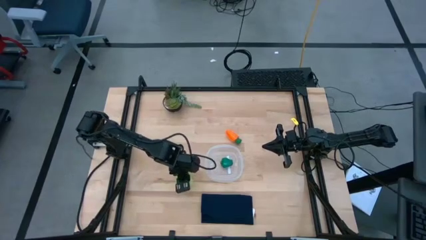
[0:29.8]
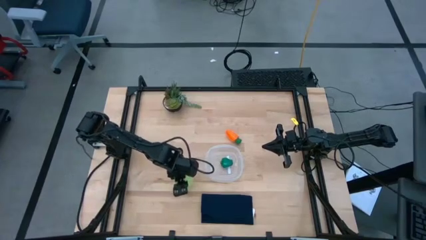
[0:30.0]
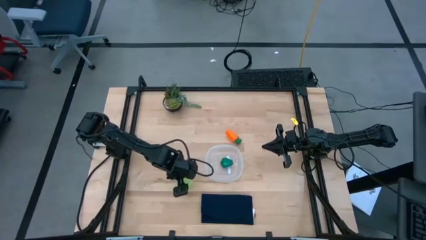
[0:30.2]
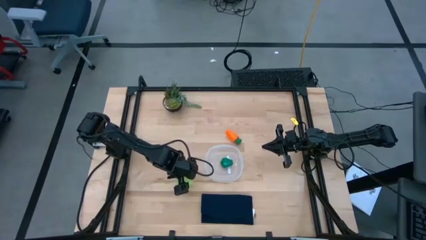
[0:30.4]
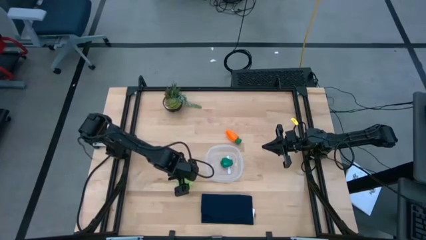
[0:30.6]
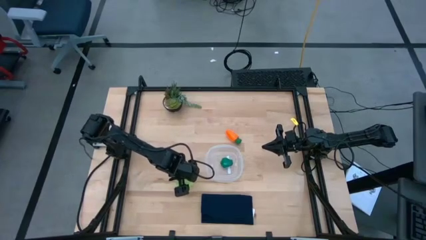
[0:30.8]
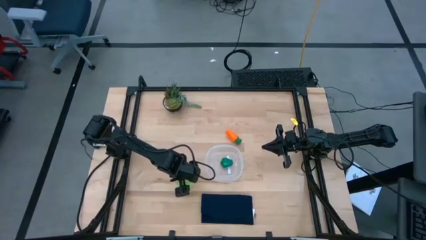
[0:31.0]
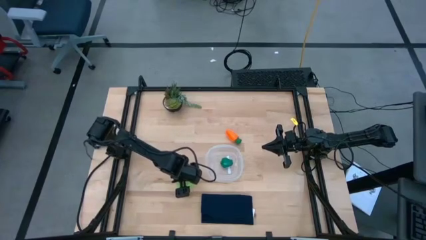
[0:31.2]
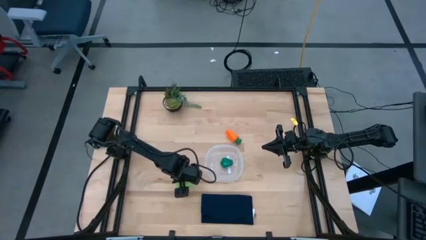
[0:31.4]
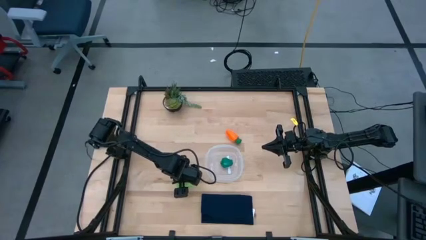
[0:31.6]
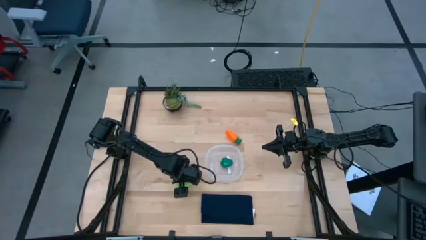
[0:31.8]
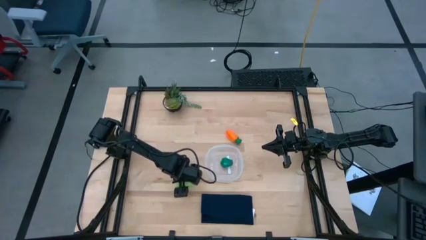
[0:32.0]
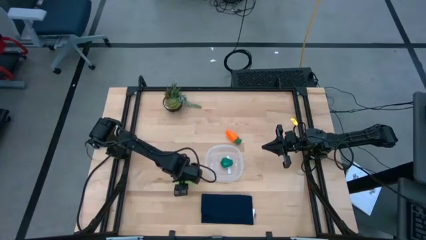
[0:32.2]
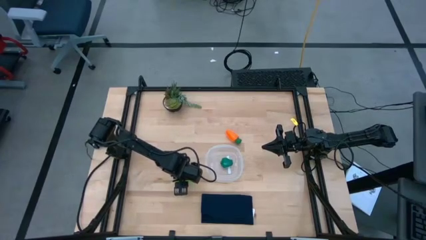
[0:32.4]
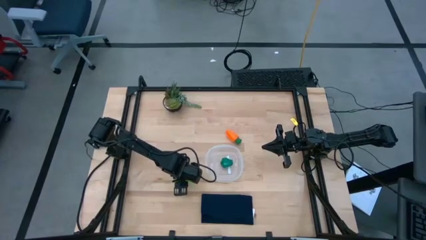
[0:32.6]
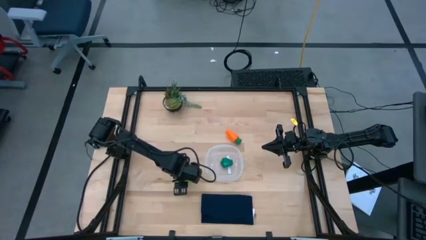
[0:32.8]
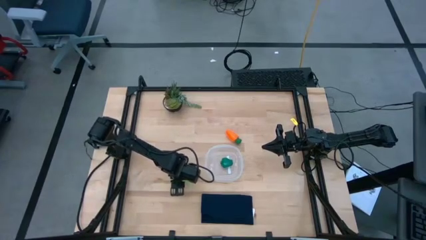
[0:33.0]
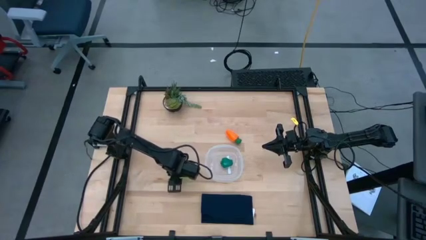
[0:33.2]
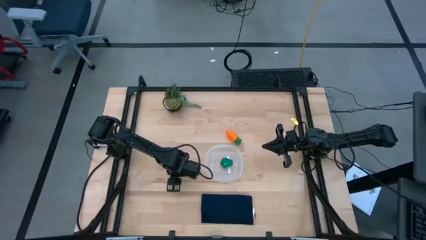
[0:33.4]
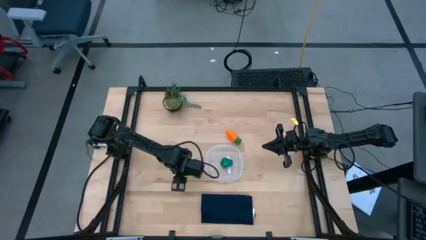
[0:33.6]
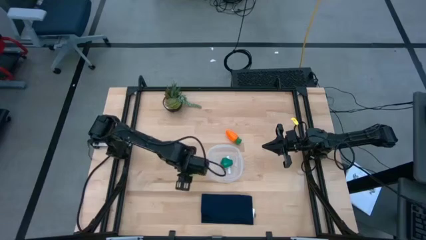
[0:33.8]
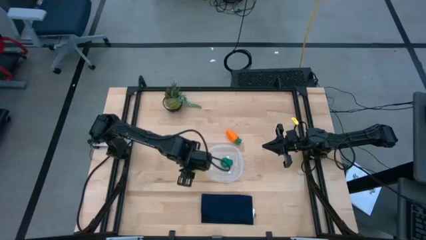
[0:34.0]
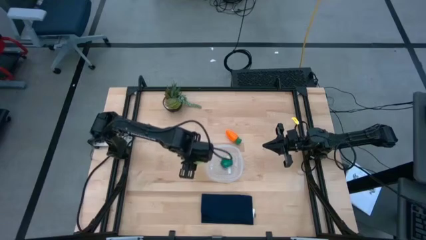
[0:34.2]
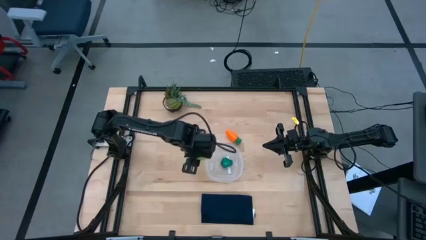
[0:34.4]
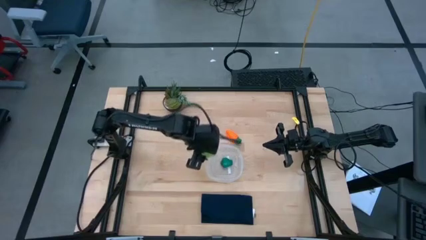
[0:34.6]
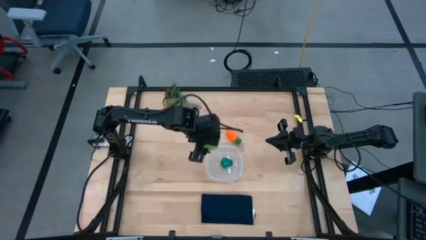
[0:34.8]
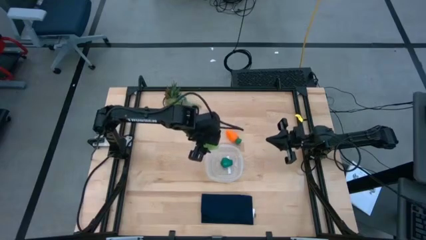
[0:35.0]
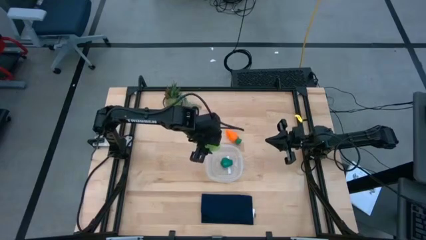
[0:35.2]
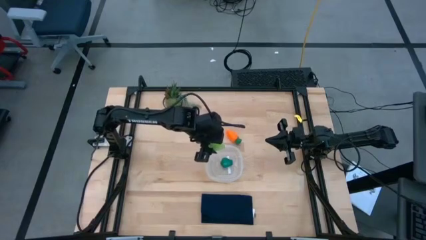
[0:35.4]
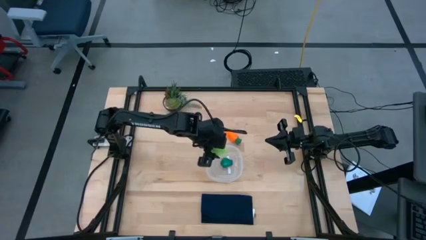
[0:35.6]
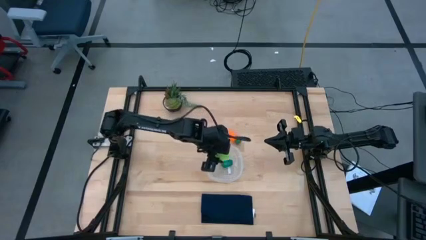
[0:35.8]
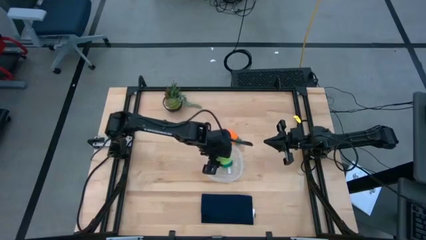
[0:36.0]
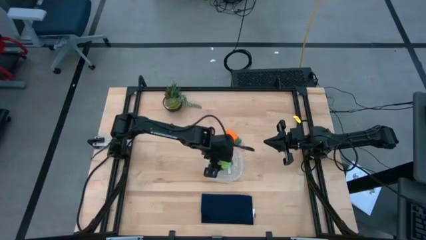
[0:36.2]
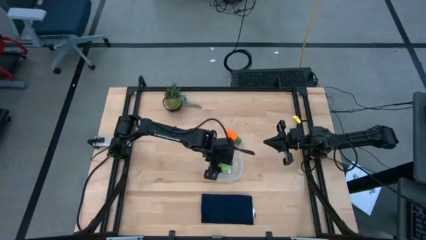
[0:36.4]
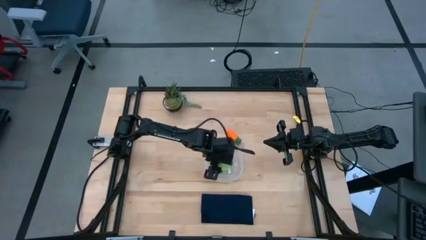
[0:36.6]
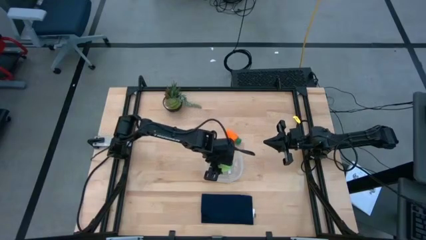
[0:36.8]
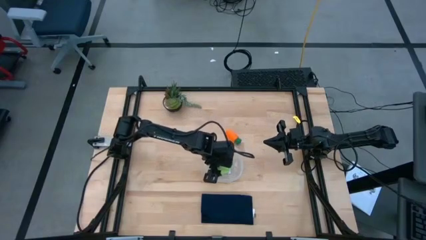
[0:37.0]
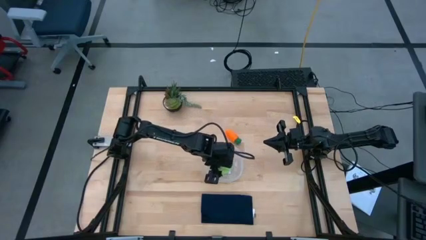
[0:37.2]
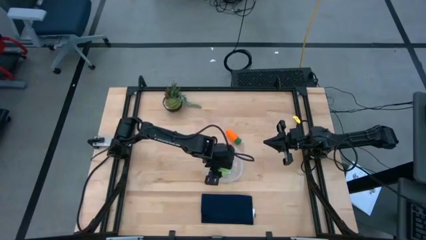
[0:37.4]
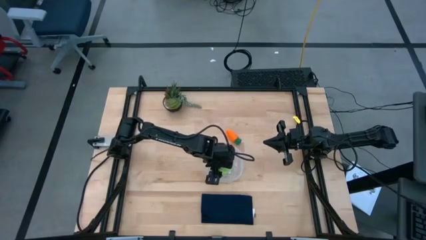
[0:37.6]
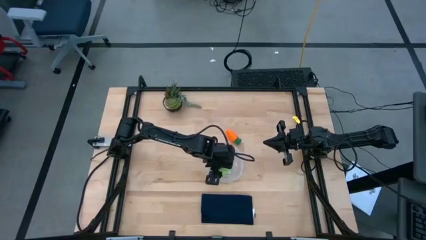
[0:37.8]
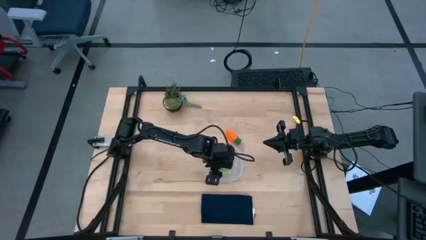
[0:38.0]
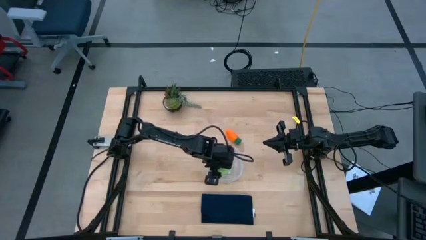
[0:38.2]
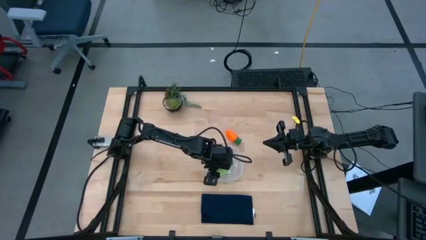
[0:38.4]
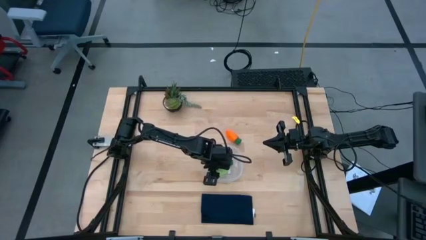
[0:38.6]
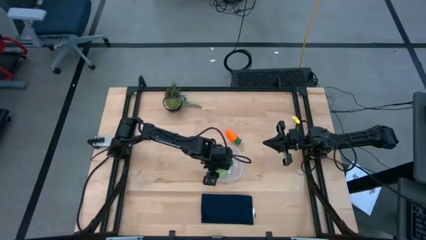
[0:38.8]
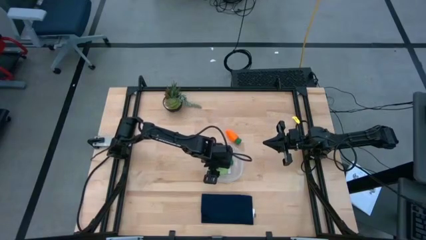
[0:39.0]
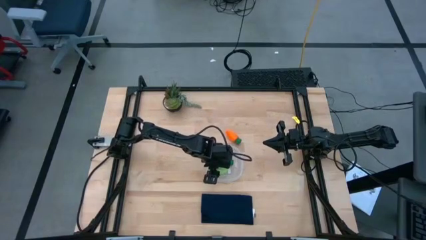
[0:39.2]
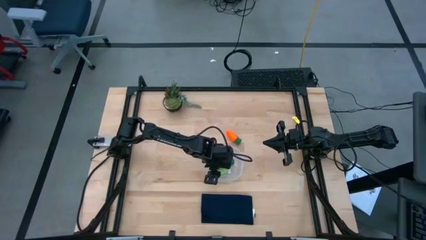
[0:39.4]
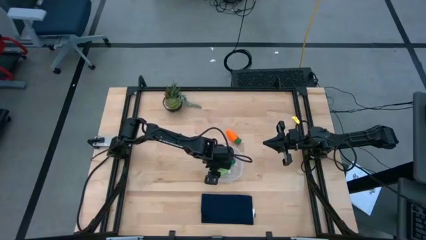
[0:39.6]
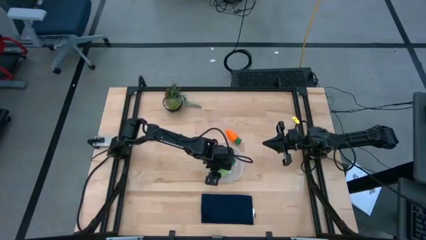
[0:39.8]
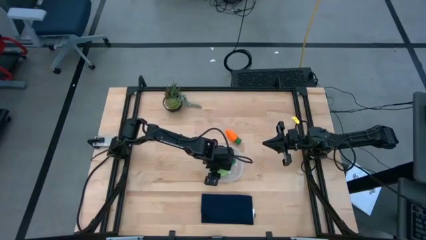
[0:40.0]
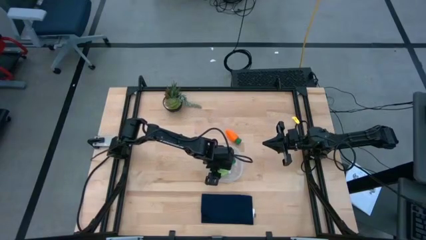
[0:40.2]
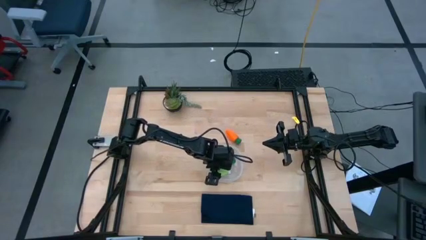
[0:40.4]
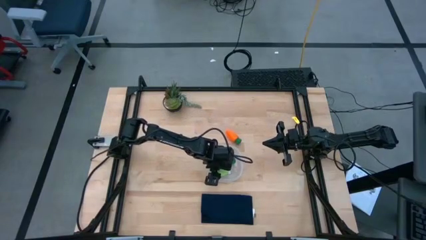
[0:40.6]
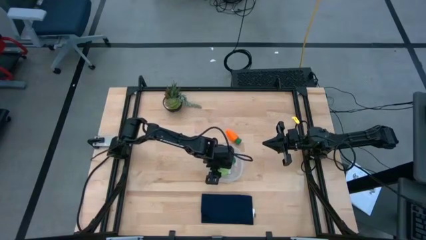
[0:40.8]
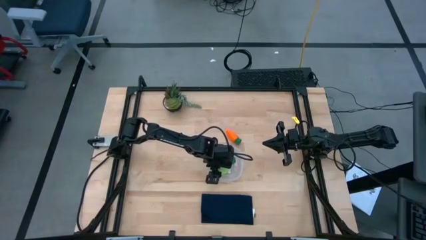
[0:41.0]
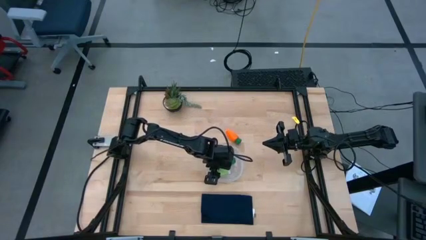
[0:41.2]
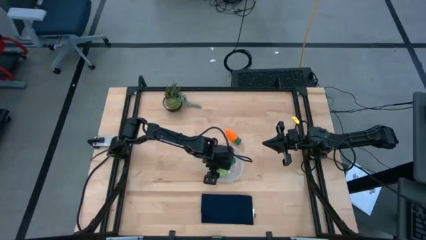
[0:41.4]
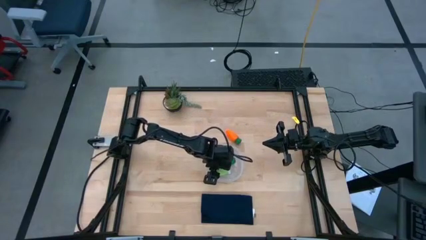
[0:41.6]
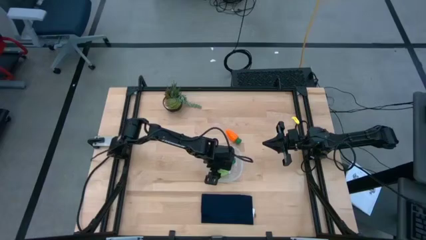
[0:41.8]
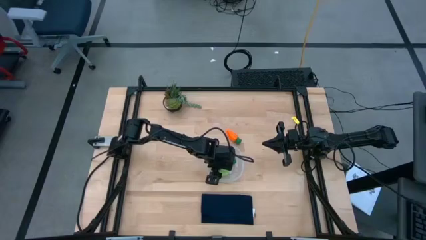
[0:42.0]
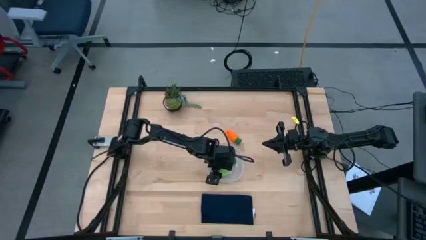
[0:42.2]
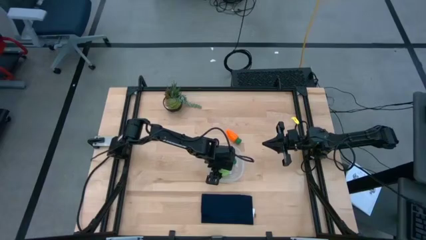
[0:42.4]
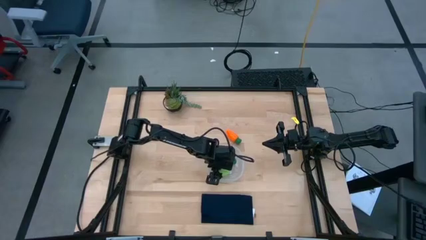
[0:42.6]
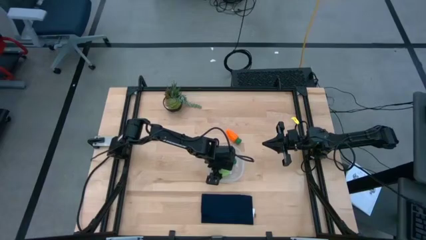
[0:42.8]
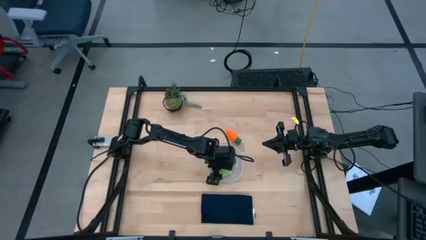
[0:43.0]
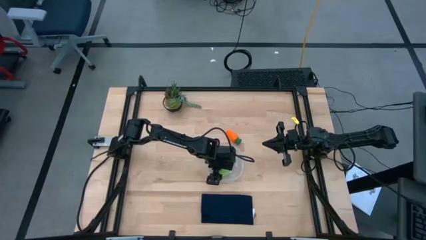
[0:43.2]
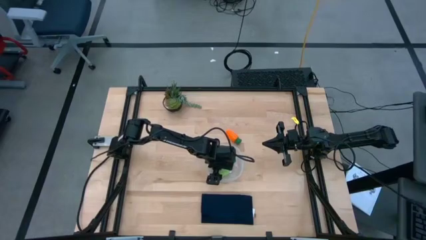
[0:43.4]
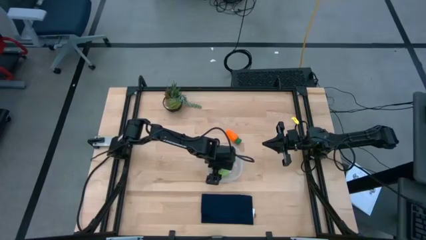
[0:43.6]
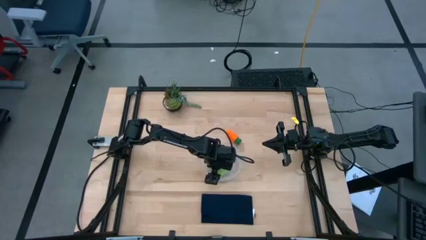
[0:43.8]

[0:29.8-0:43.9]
Task: Pick and placing Produce into tupperware
Put the green starfruit into the transparent bin
